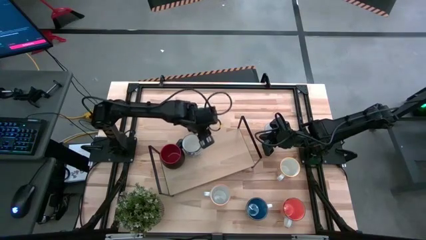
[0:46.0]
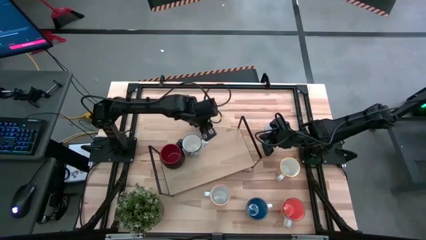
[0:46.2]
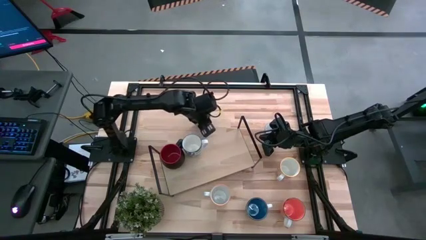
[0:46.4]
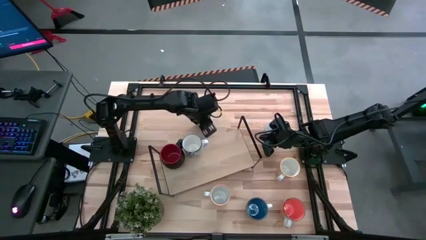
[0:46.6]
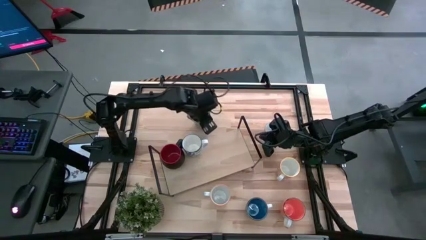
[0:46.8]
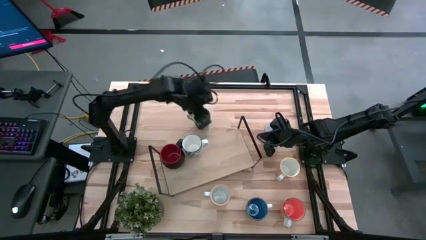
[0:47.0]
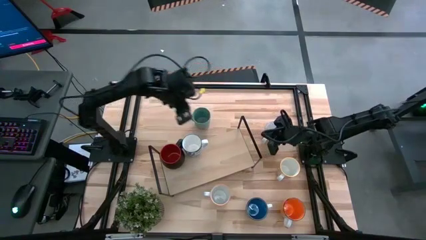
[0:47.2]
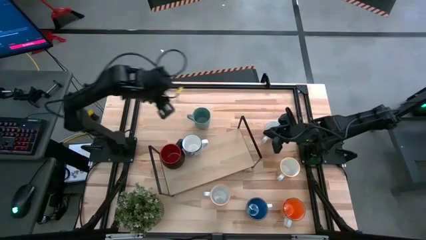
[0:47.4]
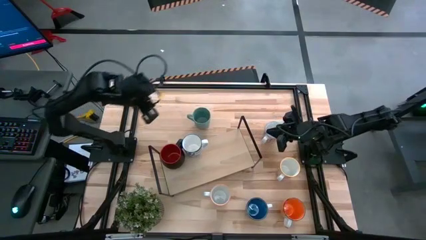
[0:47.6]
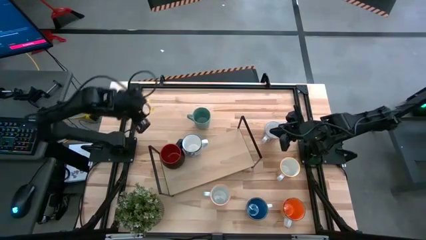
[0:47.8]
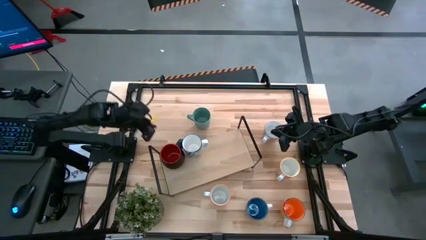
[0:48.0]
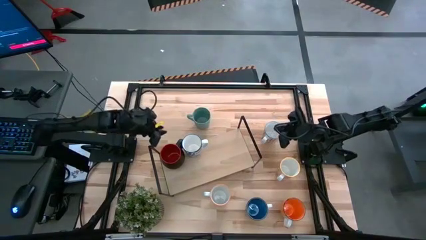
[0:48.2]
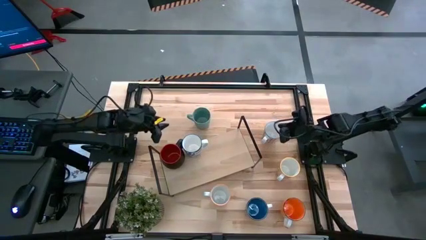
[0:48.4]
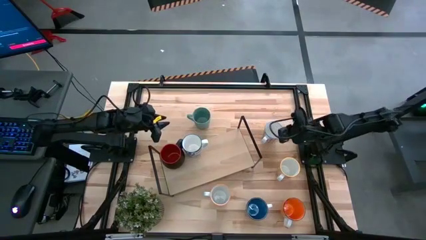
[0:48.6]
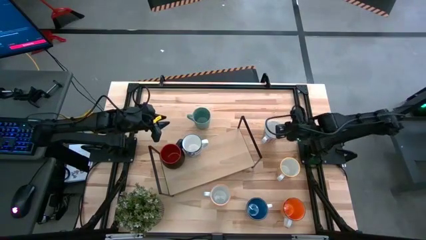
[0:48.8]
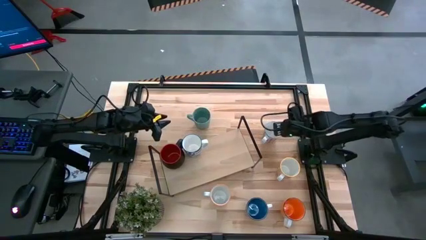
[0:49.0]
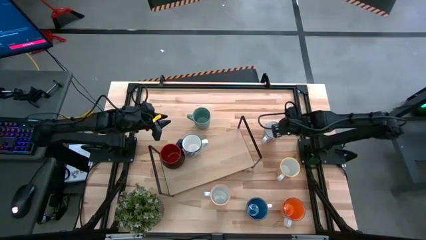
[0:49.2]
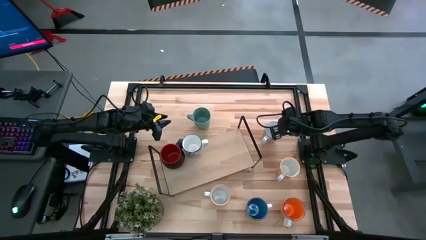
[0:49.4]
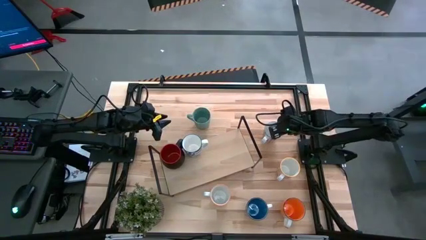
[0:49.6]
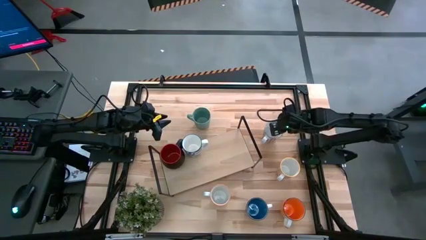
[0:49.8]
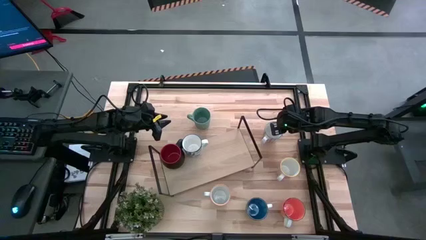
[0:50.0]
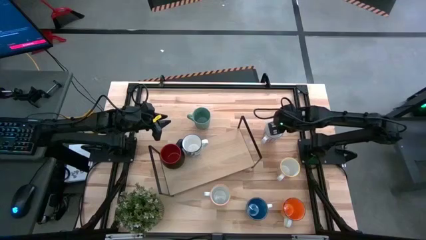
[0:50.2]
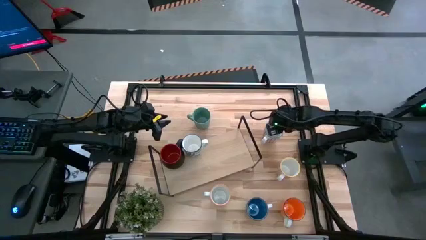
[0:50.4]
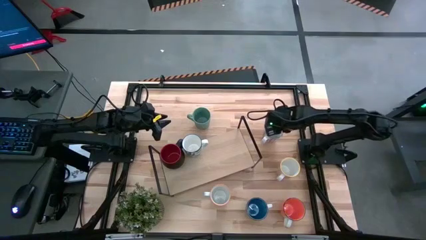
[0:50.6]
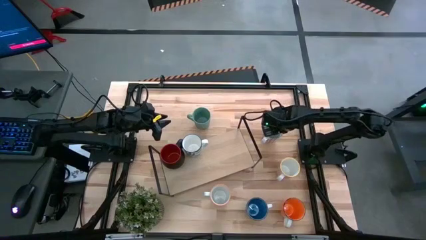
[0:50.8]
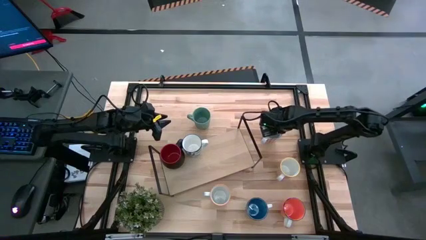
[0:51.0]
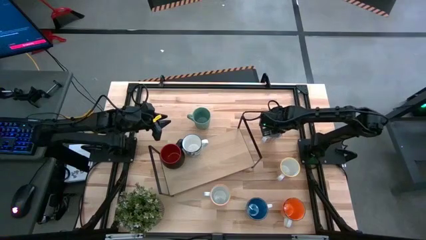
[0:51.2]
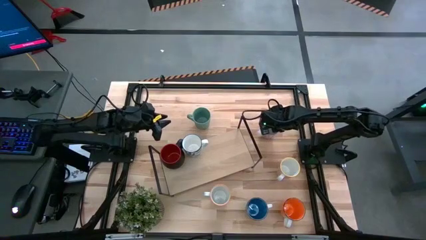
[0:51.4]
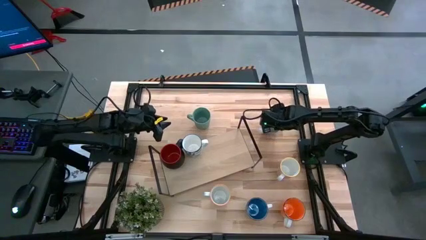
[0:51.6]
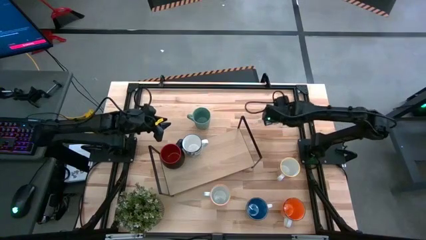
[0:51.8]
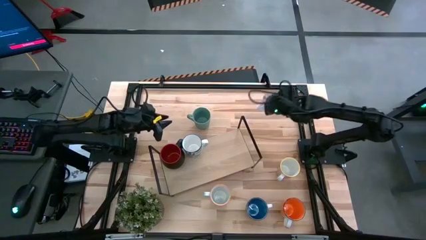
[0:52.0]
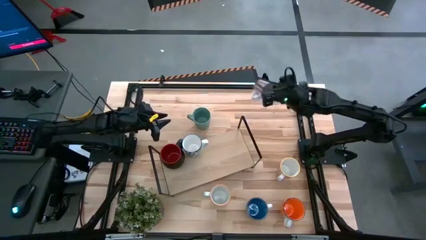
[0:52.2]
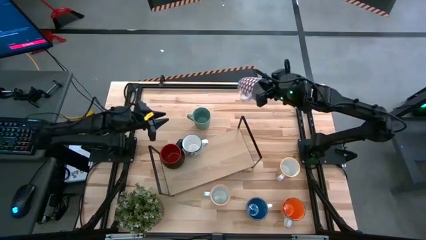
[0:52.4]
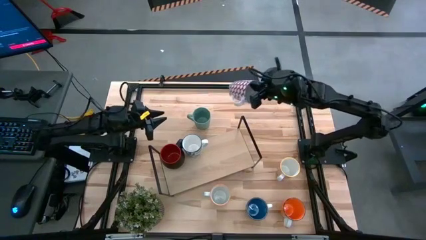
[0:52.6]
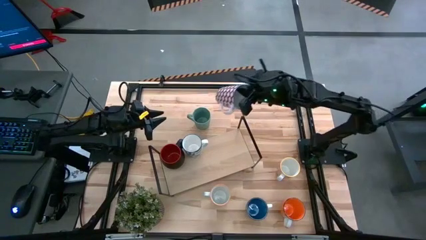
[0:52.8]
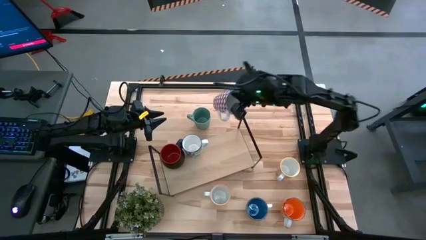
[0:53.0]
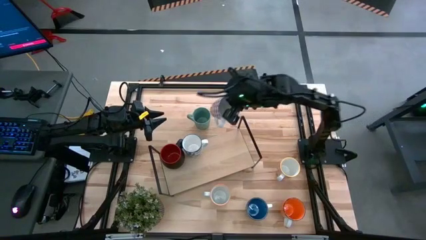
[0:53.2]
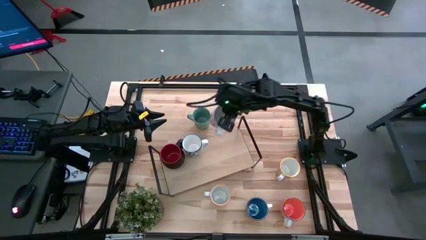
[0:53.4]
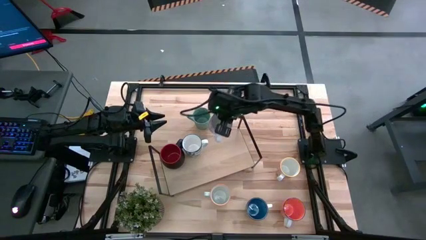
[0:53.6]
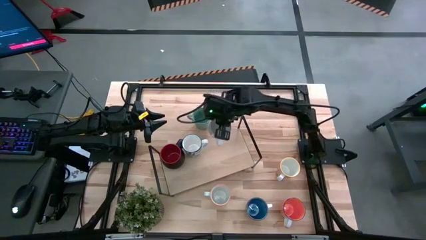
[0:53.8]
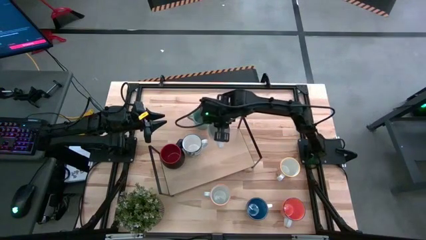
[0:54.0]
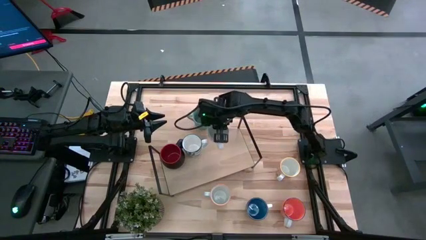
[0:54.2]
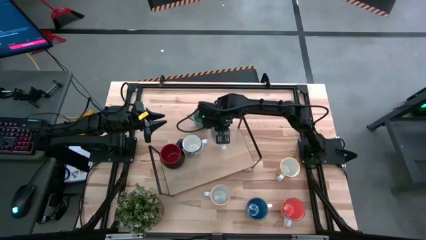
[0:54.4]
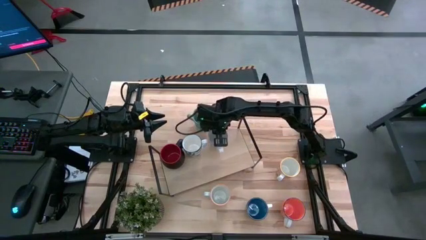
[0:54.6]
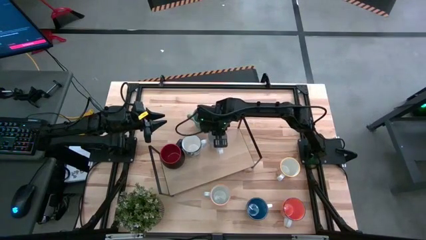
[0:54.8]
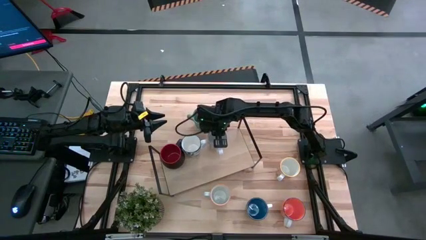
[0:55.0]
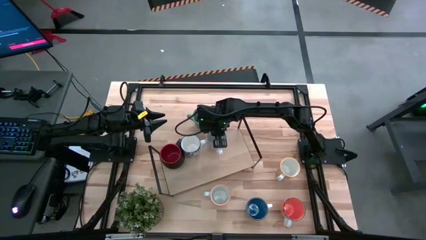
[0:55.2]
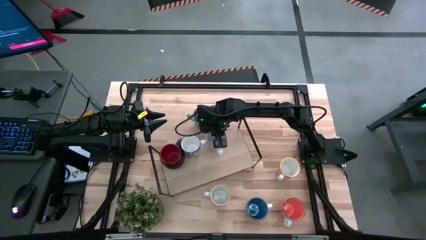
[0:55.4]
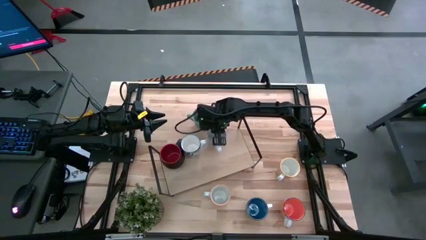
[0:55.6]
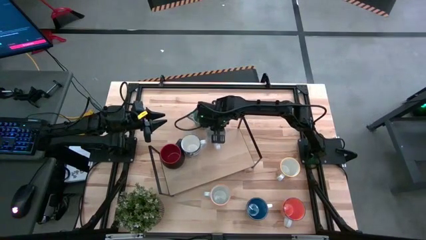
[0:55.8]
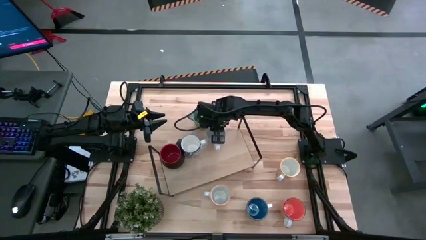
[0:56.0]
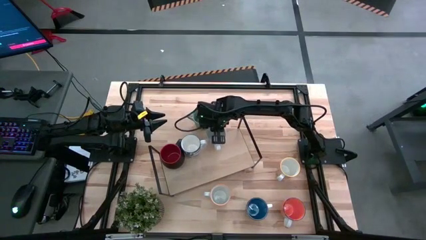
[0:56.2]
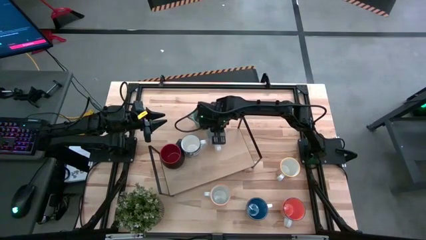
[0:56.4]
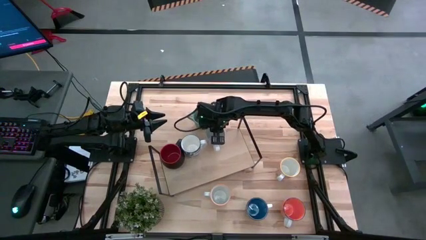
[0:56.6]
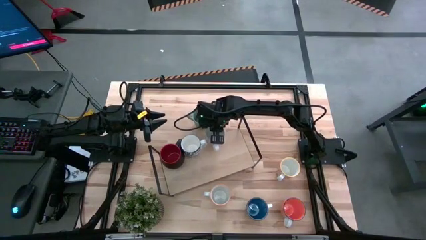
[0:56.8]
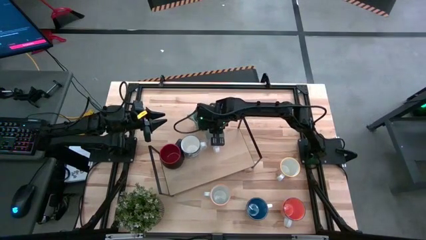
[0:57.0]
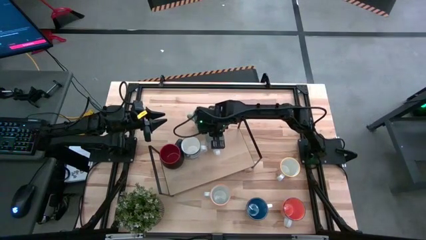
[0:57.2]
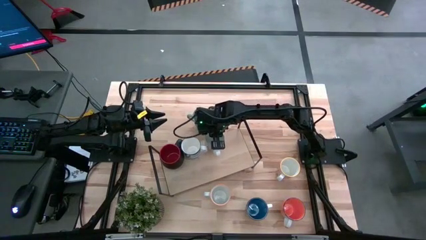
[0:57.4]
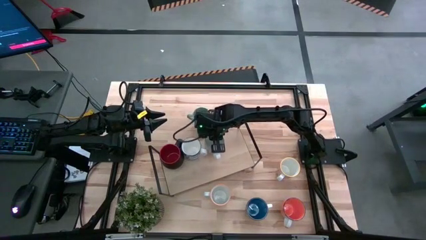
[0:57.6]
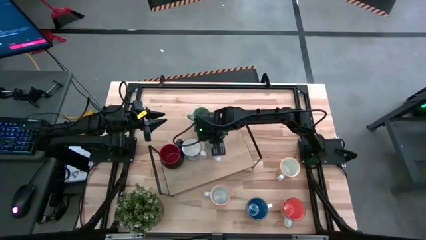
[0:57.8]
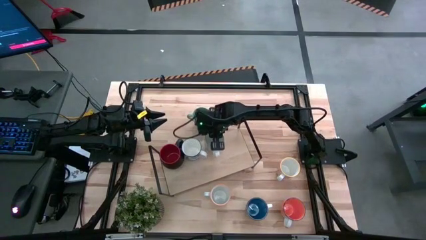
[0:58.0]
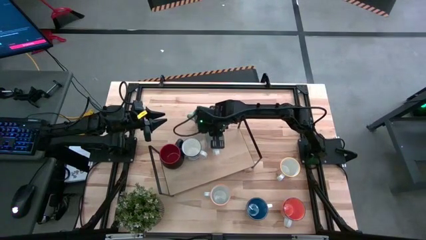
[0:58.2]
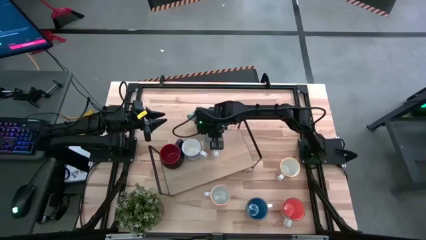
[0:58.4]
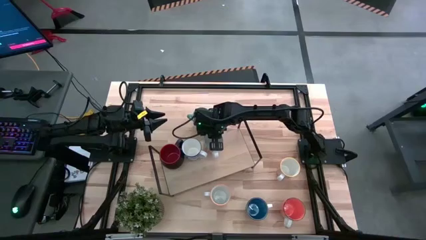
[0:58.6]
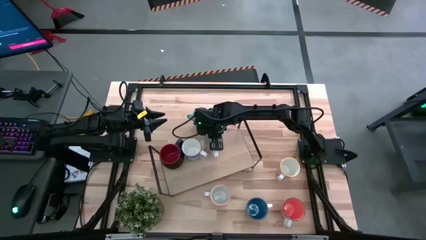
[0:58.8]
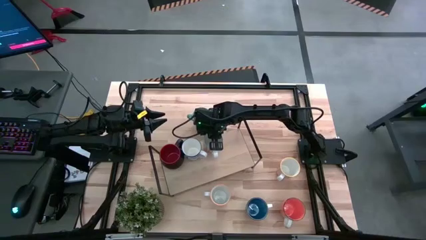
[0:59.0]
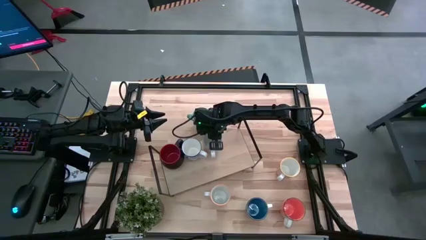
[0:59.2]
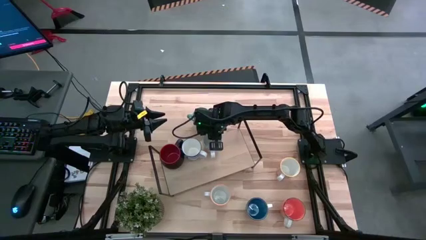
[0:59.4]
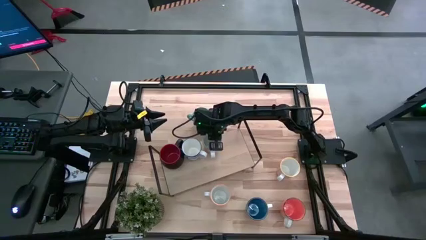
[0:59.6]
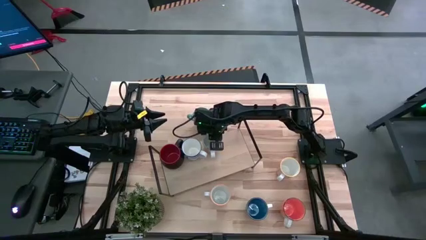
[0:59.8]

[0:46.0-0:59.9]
Task: Place coffee mugs
Put the red pattern mug on the shelf
